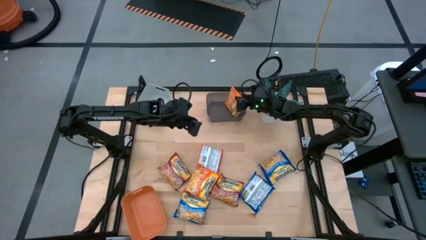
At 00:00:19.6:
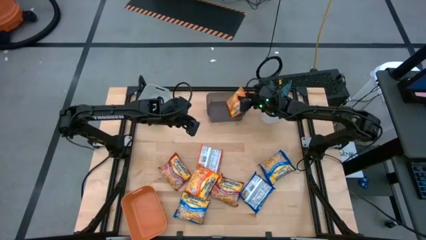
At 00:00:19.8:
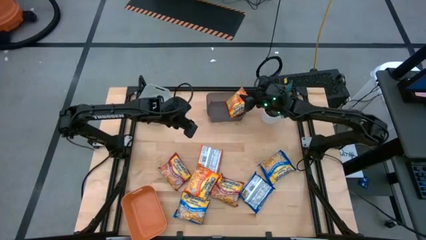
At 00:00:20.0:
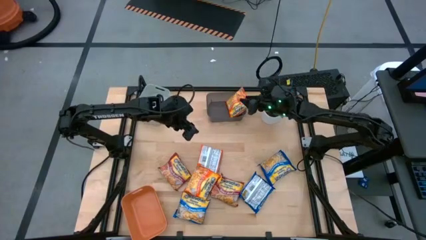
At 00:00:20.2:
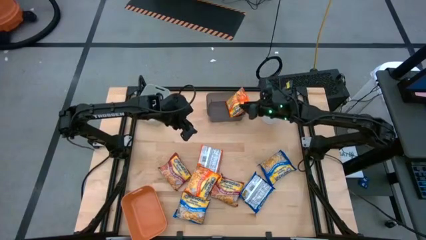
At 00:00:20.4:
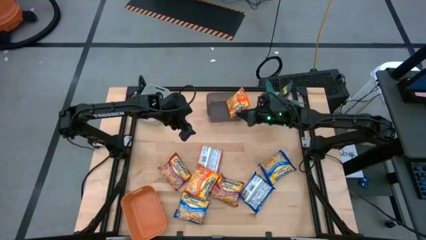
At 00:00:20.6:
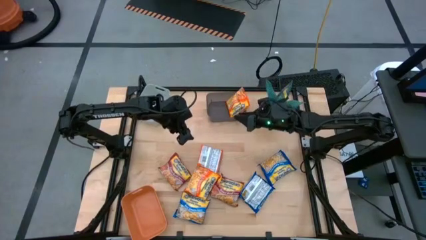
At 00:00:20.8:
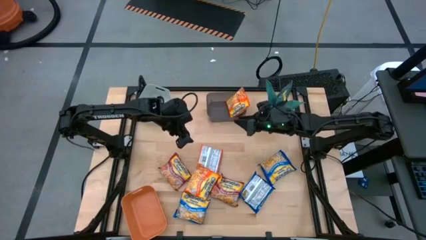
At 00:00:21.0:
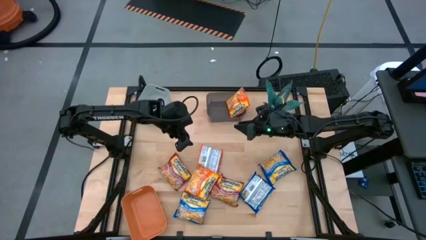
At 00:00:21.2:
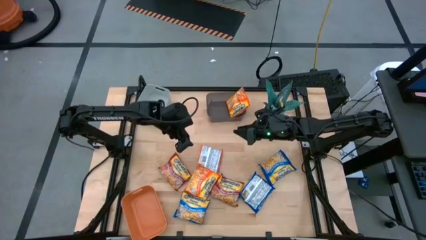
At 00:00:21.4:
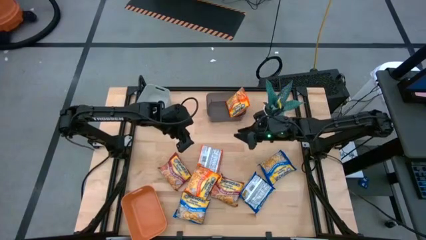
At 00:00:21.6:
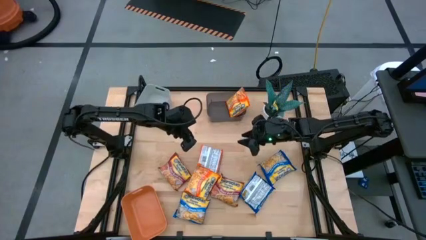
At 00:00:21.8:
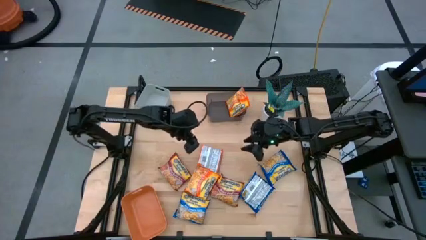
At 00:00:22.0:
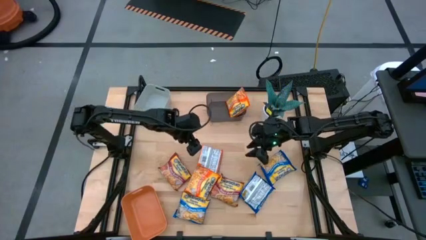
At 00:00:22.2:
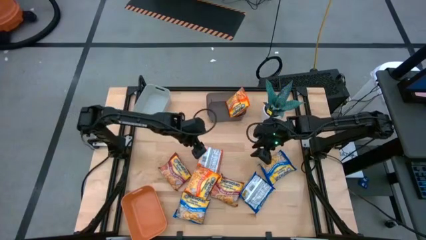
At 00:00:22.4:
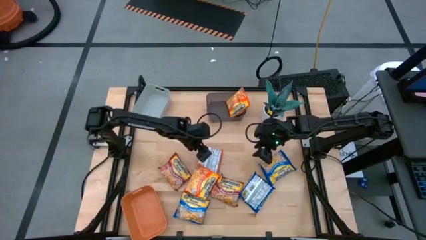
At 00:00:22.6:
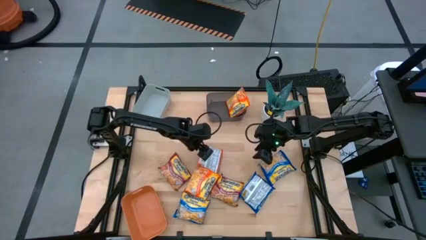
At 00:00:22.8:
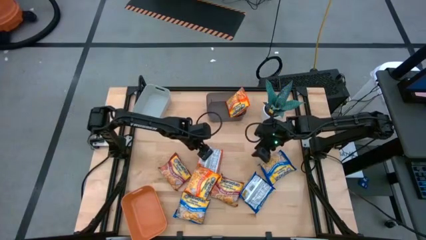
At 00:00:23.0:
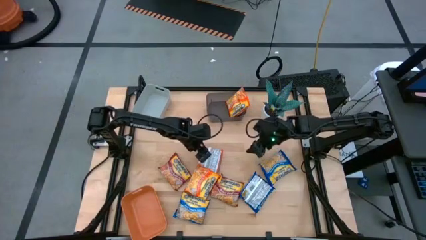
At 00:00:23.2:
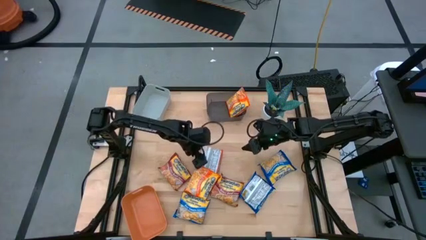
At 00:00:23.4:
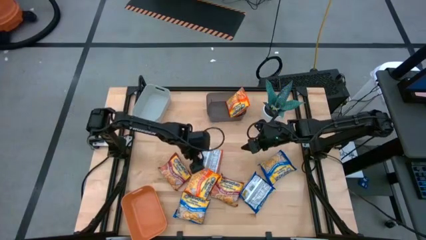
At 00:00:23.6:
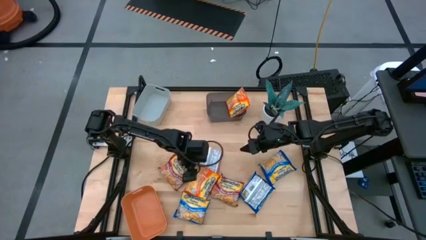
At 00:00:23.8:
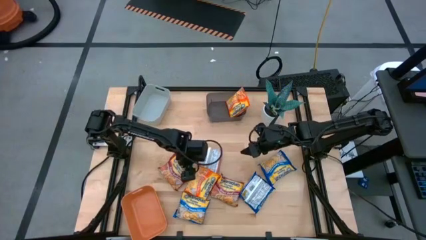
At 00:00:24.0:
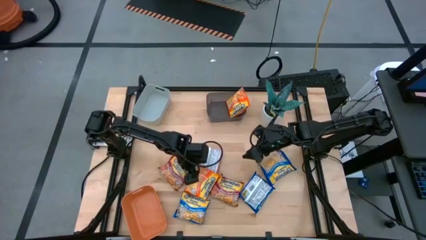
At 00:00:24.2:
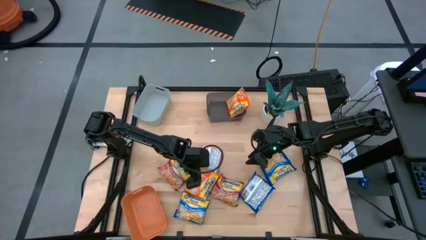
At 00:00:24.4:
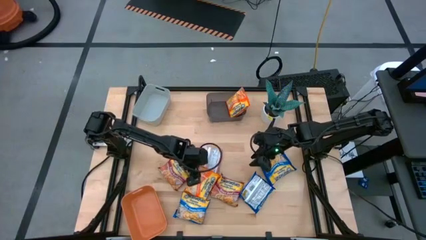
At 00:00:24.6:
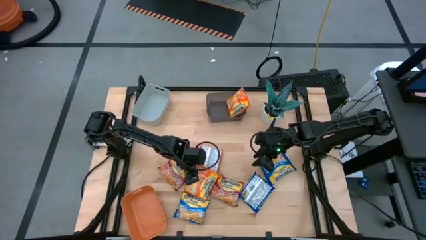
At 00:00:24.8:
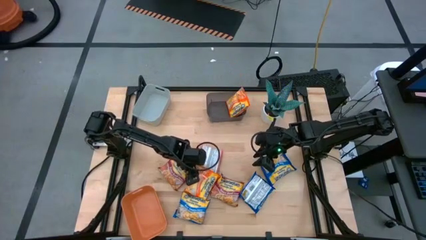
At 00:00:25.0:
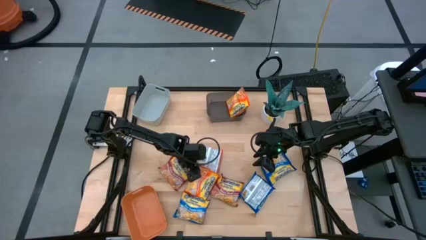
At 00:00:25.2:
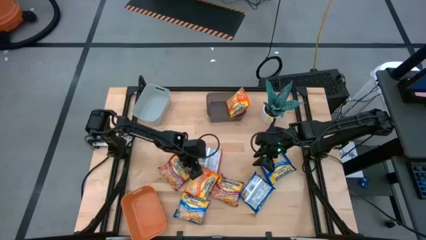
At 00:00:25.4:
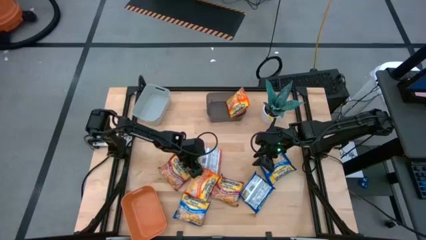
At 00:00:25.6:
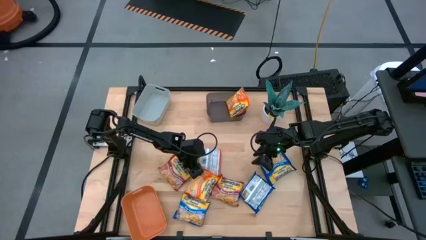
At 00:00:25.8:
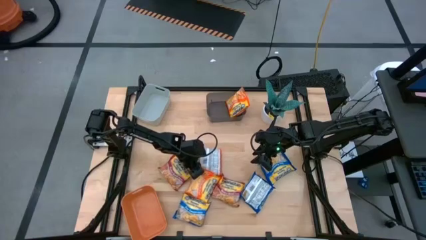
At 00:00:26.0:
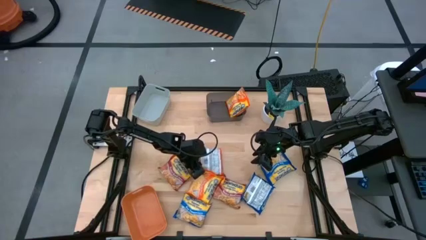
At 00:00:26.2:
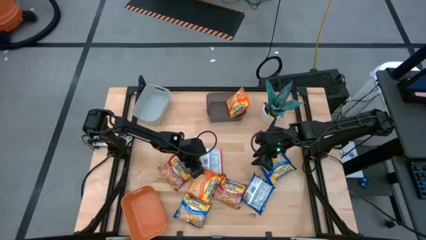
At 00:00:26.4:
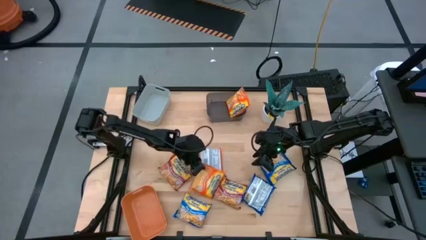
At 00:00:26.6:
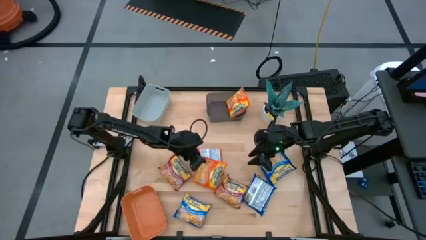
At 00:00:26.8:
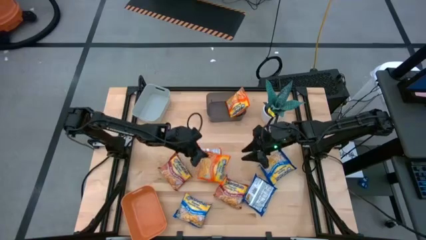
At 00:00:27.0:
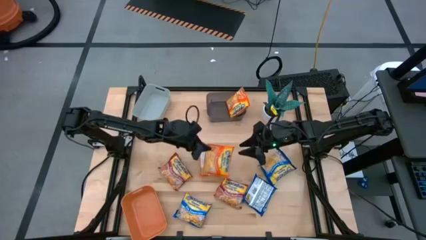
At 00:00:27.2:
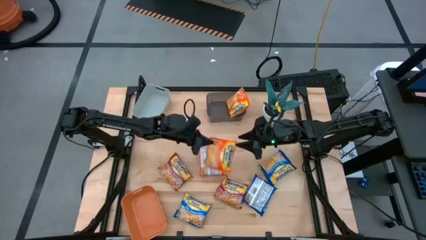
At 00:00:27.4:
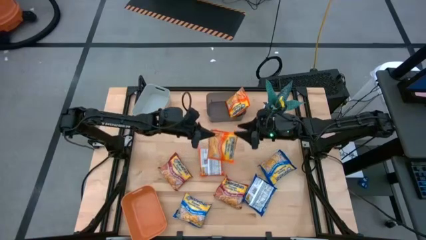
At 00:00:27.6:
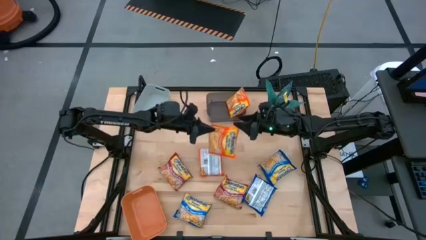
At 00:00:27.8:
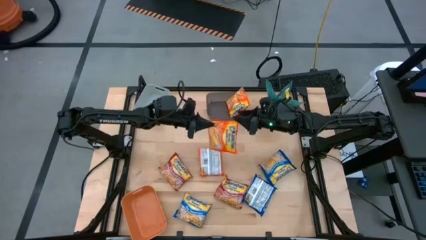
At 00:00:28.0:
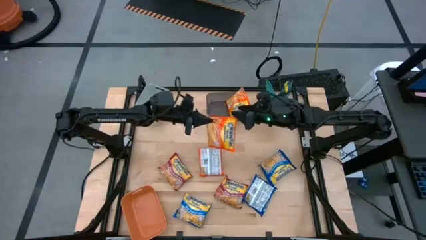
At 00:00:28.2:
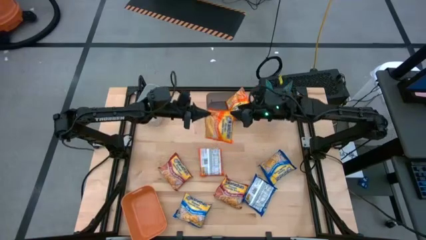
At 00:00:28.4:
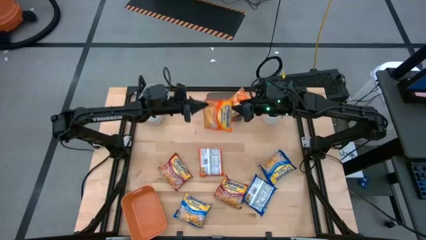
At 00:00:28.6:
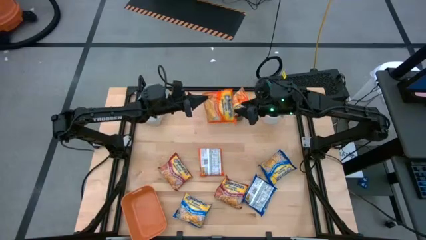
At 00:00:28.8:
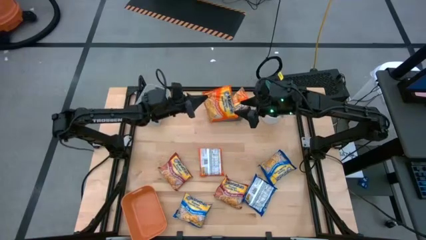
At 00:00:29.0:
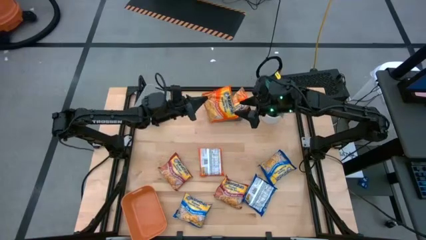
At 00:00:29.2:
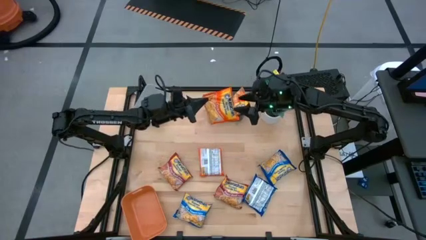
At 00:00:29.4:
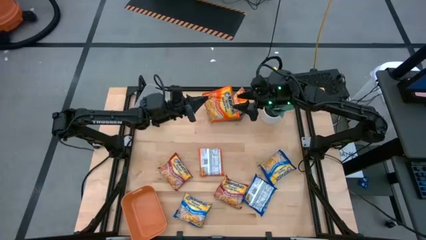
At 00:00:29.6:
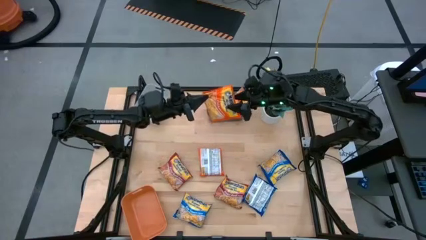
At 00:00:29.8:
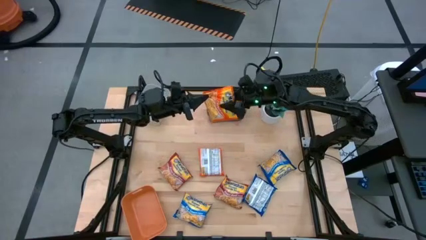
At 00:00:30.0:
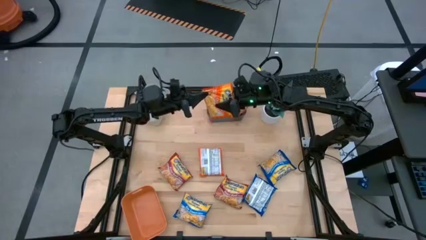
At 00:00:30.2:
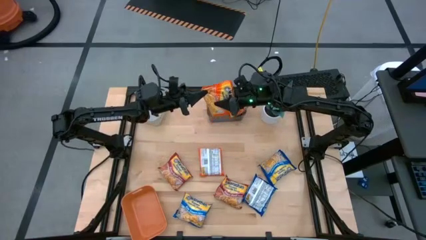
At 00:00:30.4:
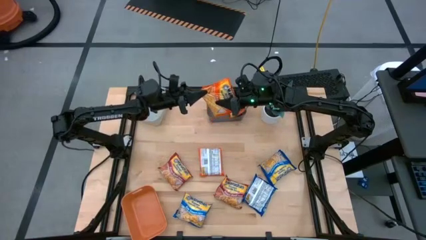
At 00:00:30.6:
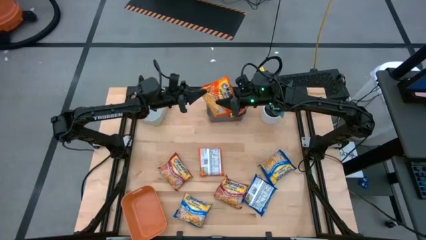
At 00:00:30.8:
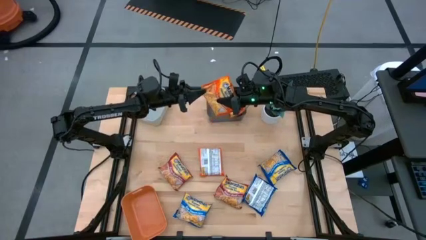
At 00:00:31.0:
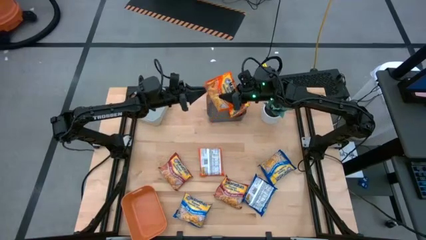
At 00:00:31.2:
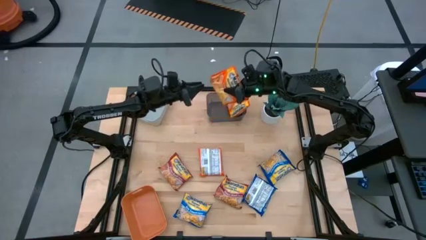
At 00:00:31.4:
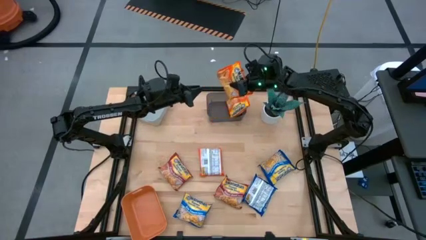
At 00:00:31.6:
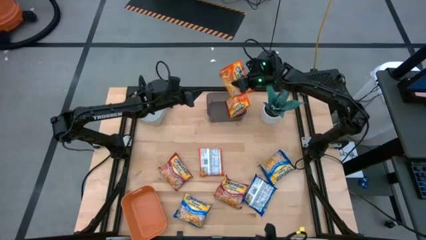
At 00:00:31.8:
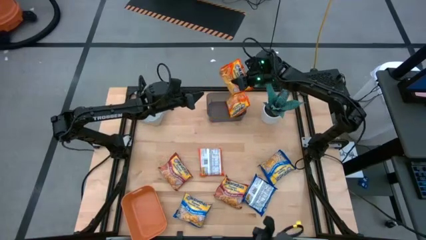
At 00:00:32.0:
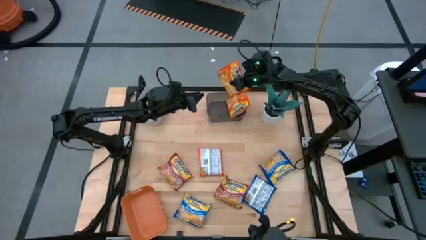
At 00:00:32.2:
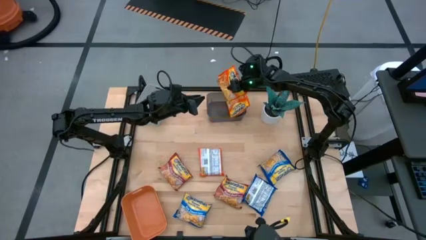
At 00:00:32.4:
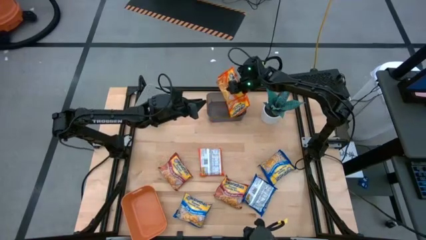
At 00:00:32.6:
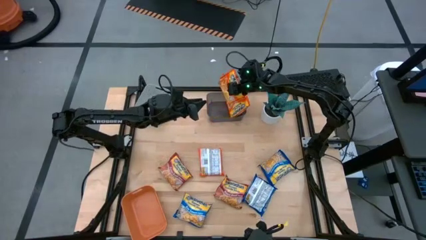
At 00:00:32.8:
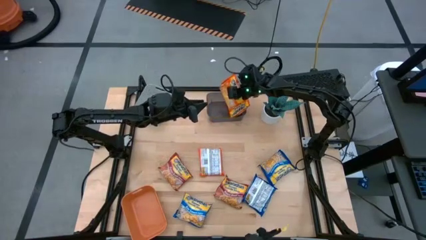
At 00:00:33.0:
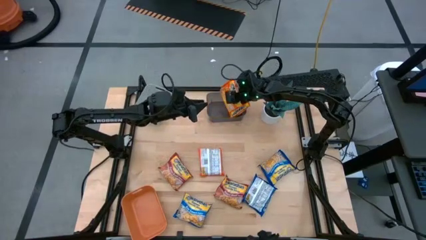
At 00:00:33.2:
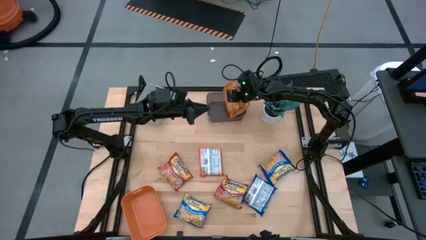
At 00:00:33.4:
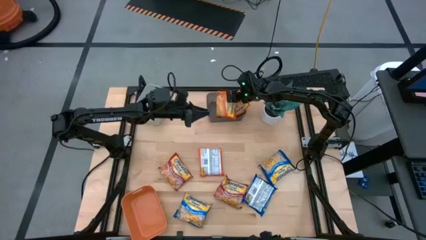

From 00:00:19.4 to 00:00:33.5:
Task: Sort Maruchan noodles
Put the bottom orange noodle pack into the black bin
